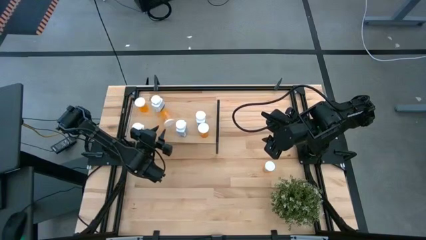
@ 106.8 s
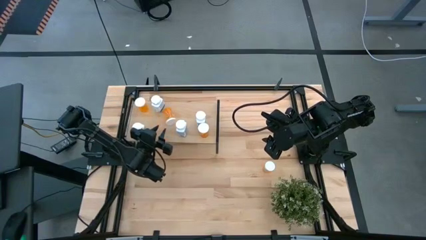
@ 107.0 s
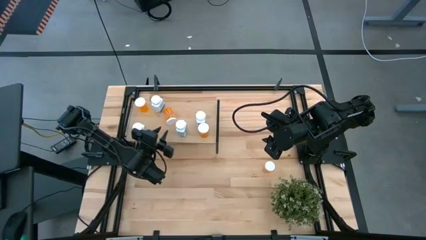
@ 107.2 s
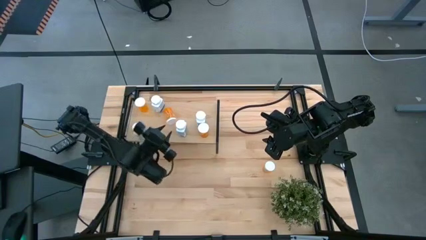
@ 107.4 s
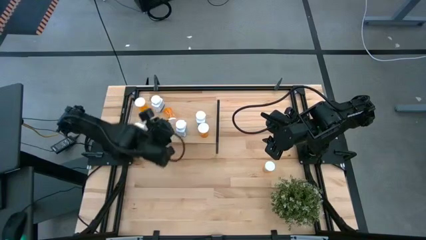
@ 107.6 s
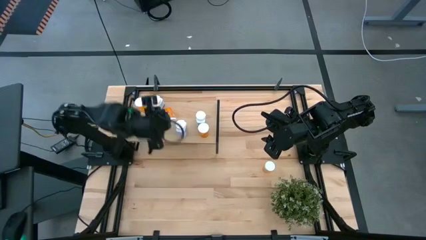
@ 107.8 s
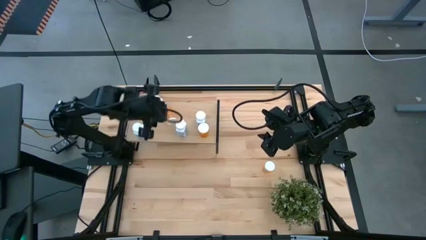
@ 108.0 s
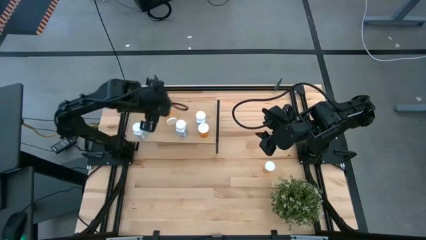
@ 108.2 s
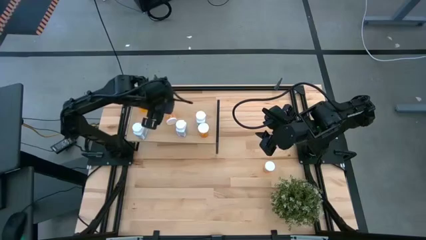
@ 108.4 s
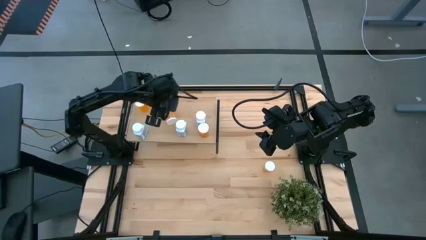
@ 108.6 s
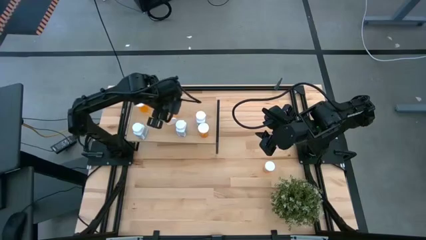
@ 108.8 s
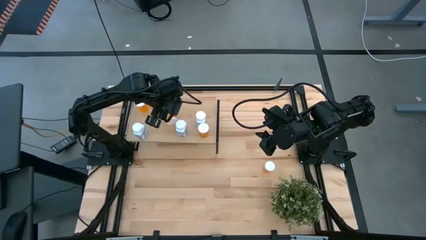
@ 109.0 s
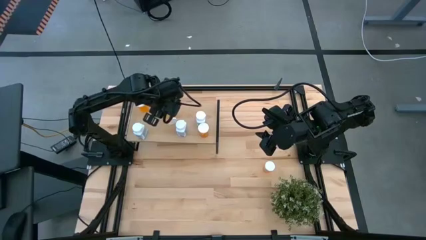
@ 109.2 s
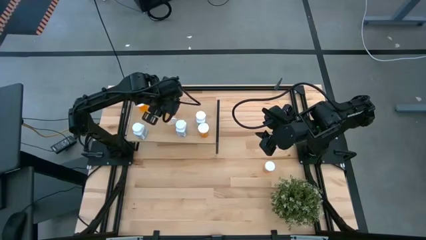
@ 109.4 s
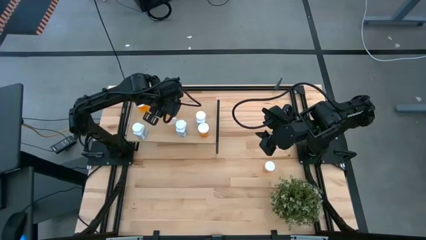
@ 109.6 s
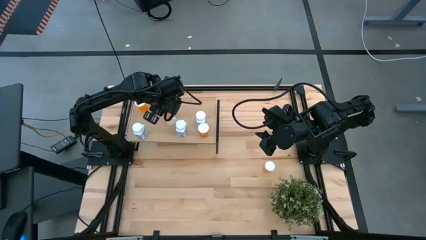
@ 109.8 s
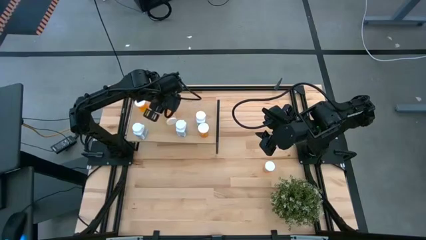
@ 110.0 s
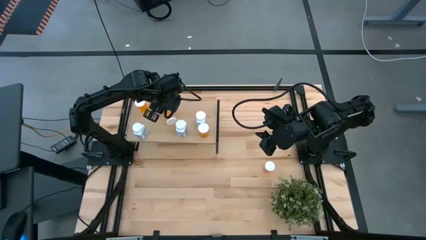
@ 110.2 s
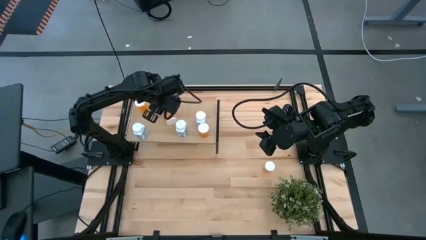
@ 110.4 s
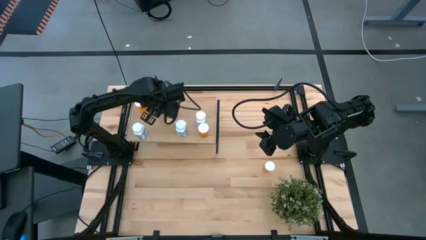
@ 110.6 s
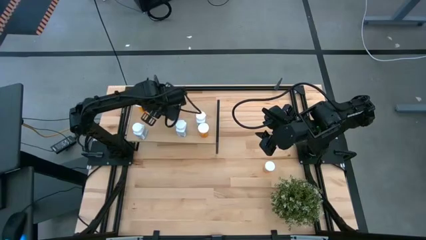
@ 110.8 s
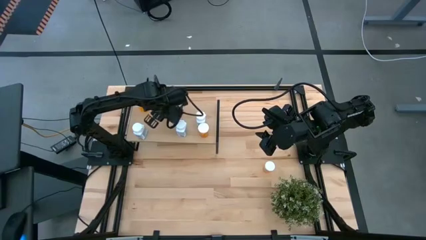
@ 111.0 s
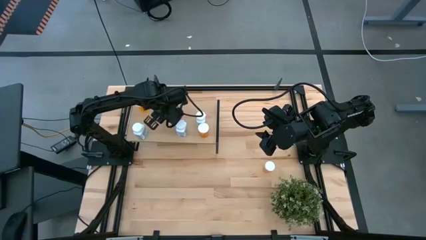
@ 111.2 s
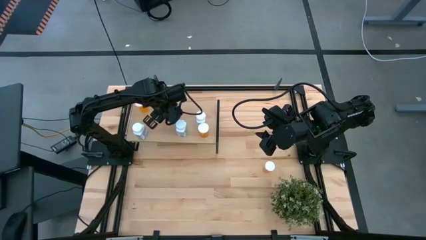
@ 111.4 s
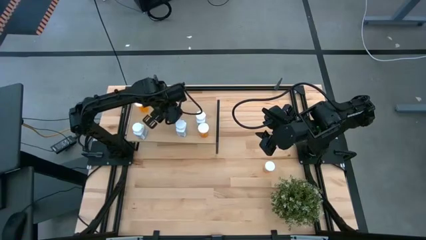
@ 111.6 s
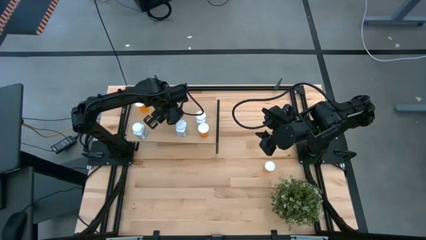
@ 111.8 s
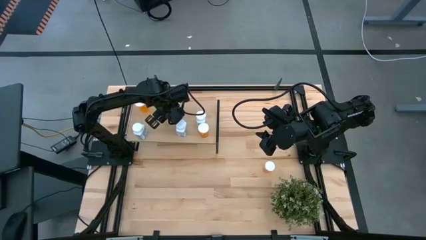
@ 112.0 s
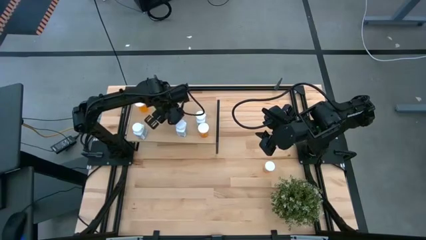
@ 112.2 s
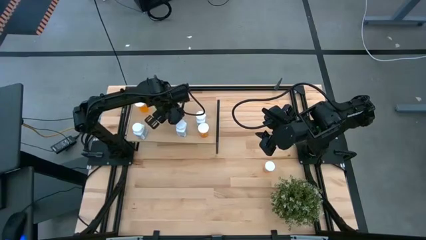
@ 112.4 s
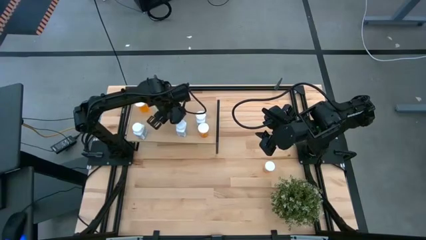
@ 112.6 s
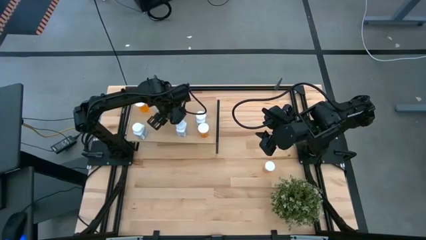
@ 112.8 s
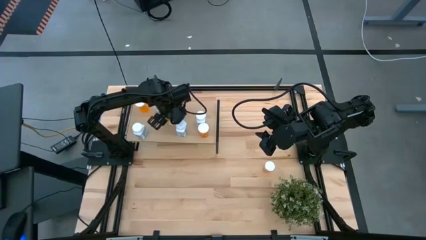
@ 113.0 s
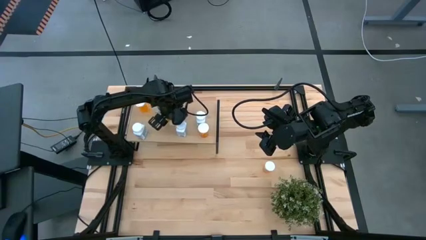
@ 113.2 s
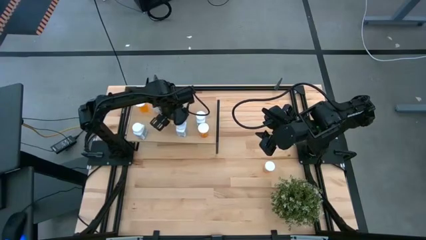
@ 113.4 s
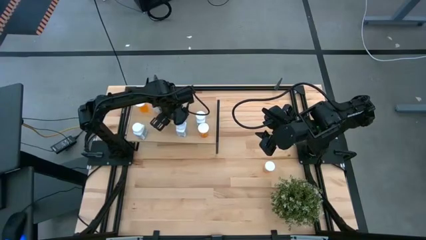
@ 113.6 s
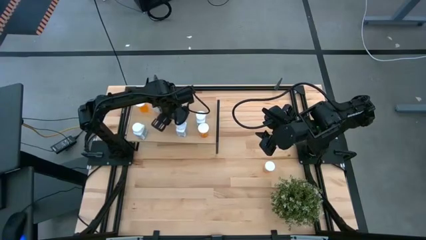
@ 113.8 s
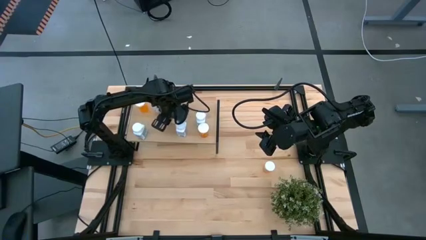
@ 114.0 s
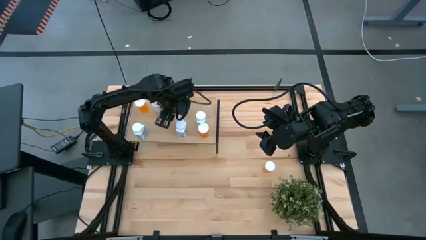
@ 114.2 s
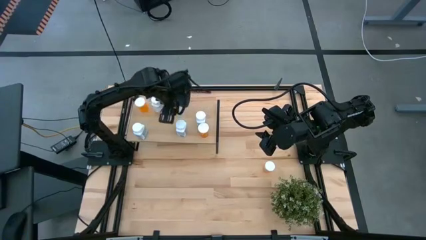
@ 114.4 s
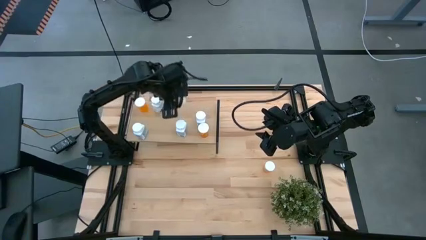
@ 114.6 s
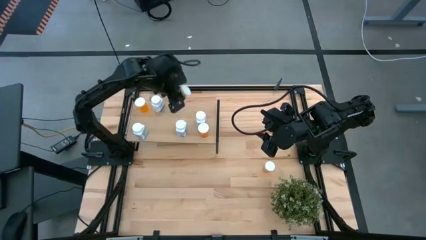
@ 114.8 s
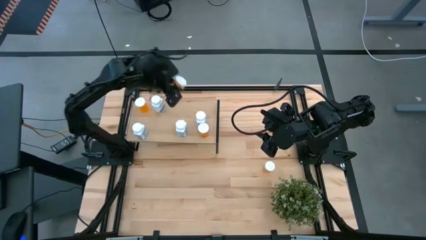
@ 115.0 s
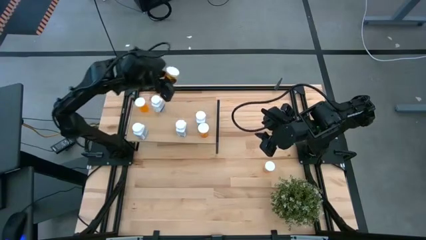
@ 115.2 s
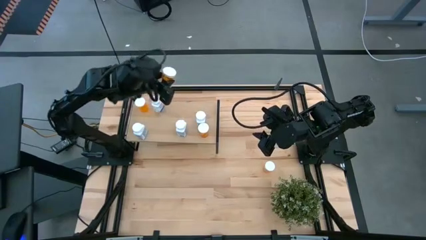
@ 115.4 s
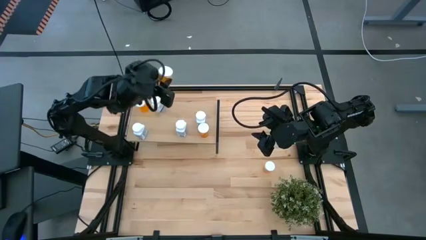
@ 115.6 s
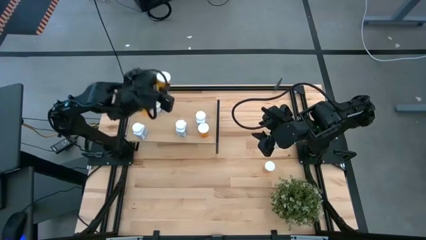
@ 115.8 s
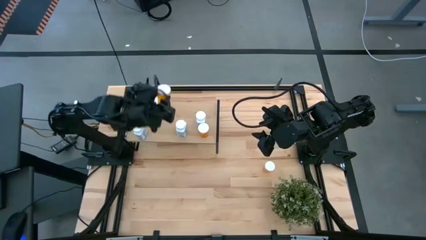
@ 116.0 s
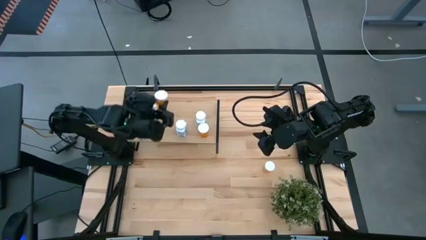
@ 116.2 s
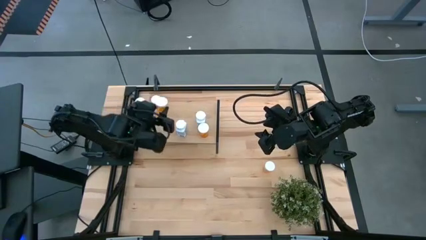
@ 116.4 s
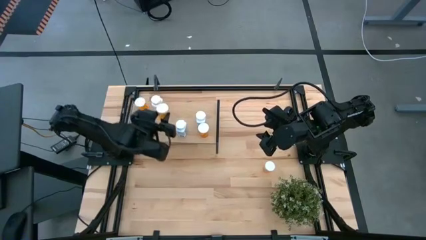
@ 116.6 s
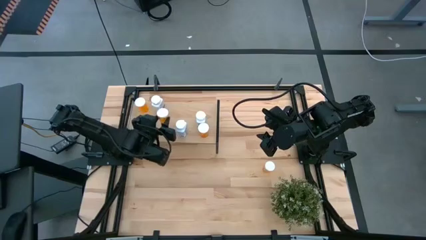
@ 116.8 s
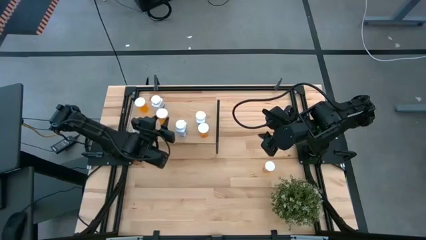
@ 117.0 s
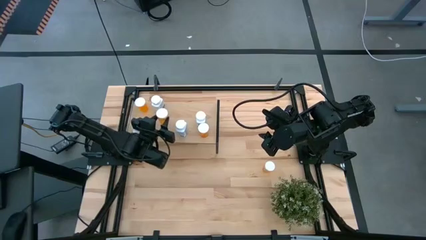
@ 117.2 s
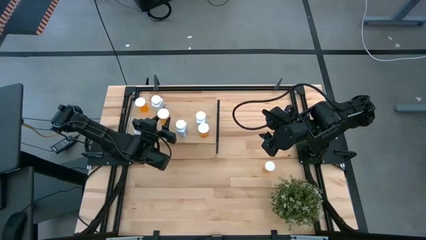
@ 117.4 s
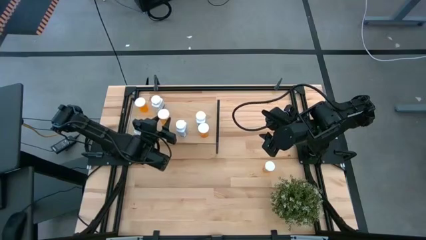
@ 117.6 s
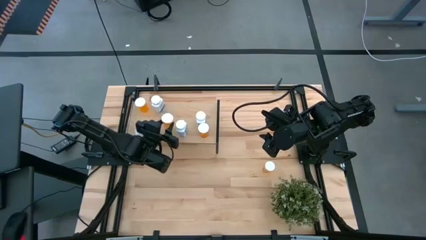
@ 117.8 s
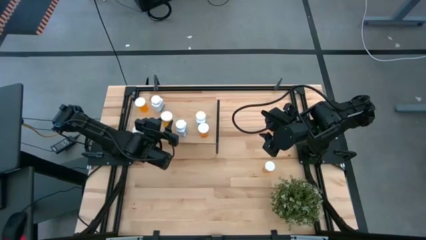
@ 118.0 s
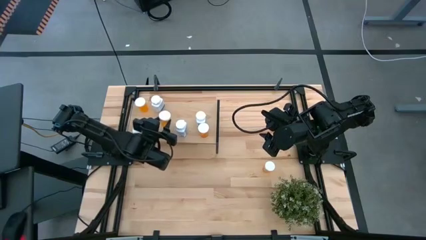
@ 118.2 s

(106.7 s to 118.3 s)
Task: Pick and place medicine bottles onto shelf by color
Put the orange pill bottle on the shelf

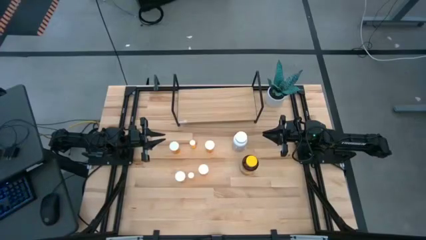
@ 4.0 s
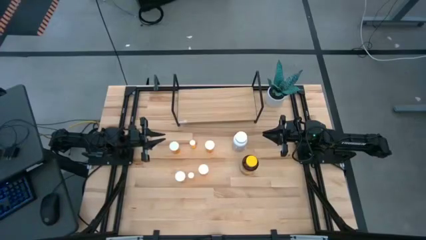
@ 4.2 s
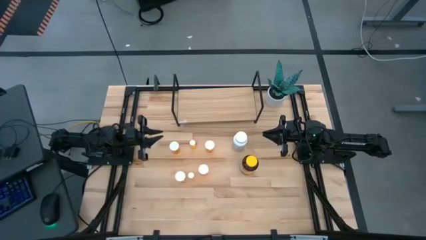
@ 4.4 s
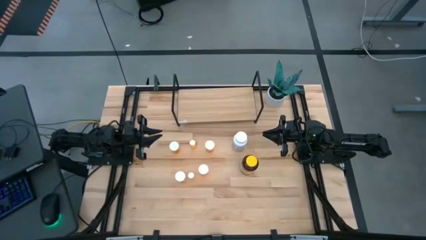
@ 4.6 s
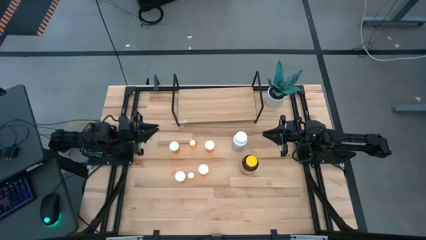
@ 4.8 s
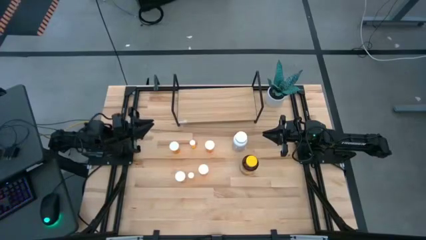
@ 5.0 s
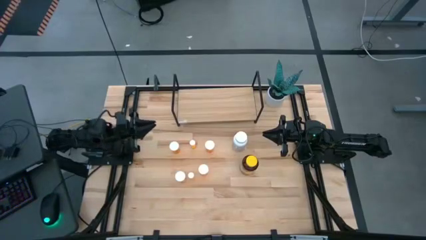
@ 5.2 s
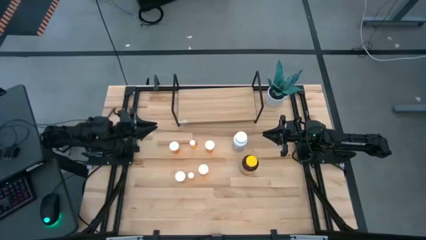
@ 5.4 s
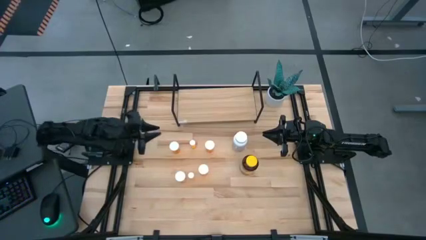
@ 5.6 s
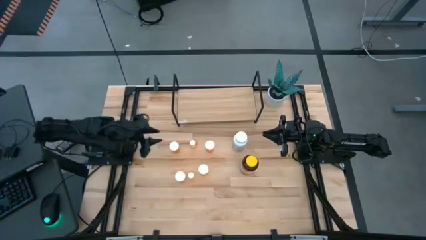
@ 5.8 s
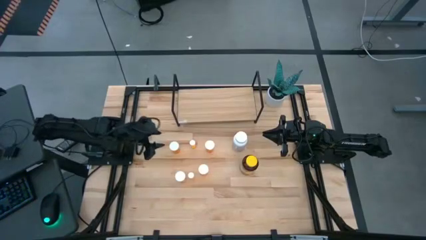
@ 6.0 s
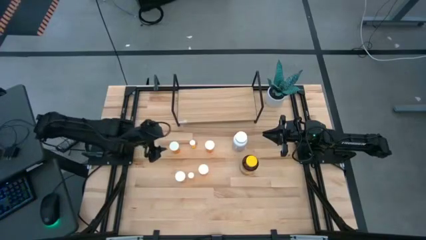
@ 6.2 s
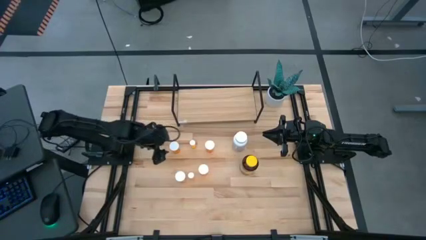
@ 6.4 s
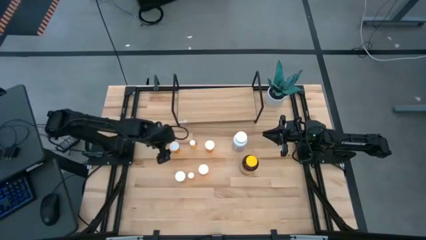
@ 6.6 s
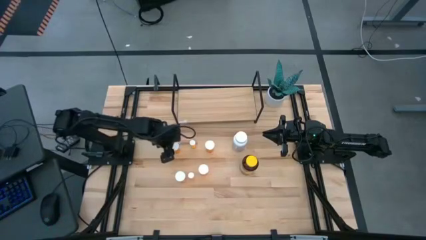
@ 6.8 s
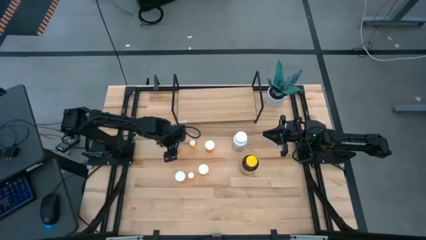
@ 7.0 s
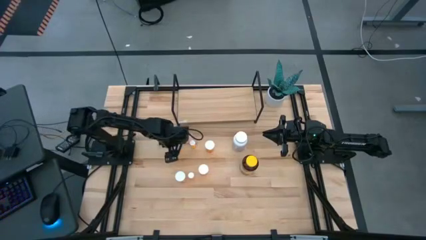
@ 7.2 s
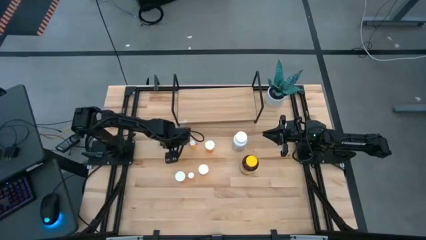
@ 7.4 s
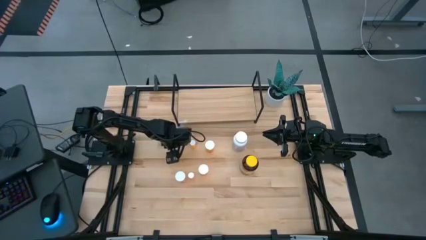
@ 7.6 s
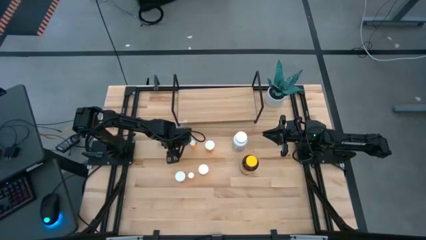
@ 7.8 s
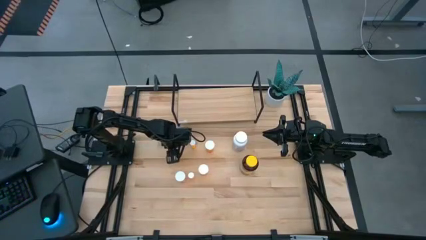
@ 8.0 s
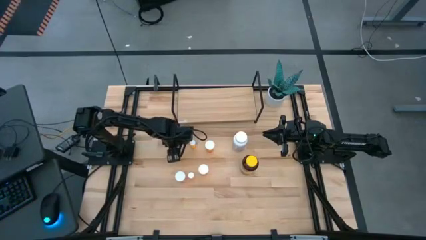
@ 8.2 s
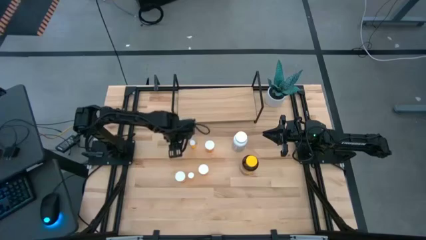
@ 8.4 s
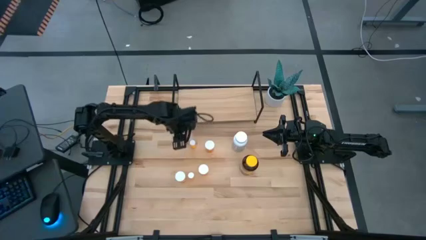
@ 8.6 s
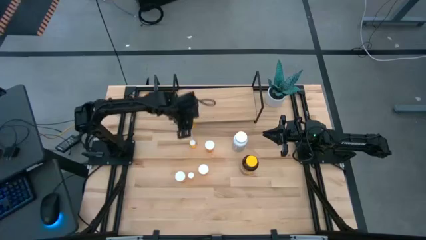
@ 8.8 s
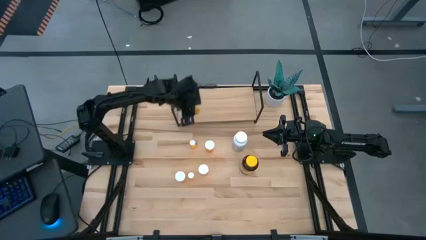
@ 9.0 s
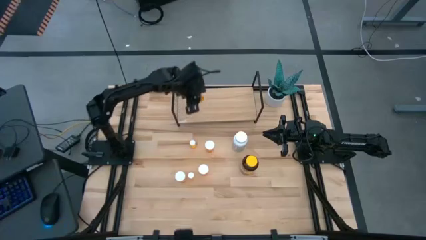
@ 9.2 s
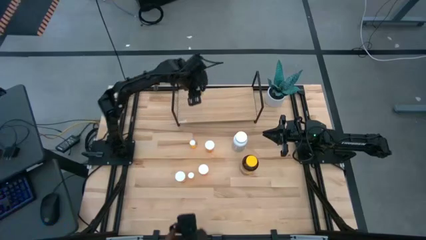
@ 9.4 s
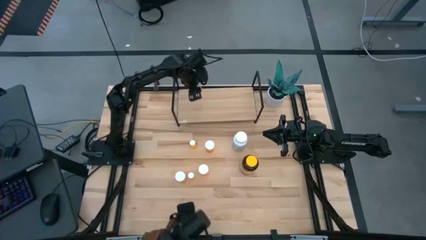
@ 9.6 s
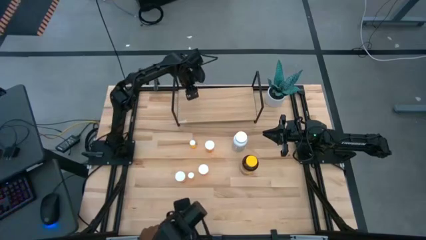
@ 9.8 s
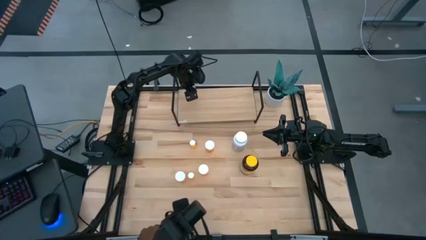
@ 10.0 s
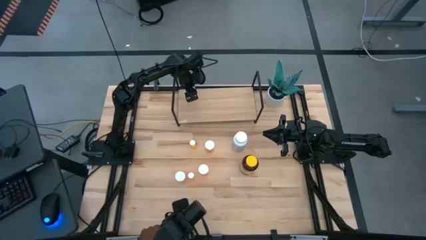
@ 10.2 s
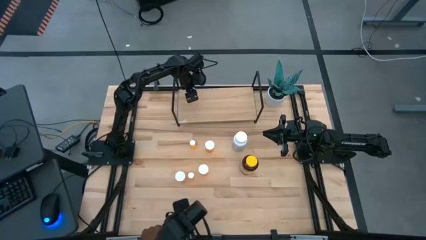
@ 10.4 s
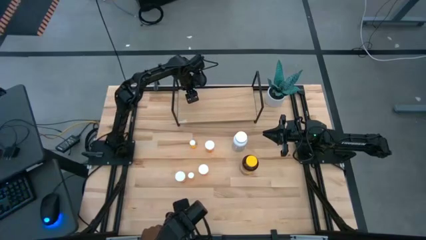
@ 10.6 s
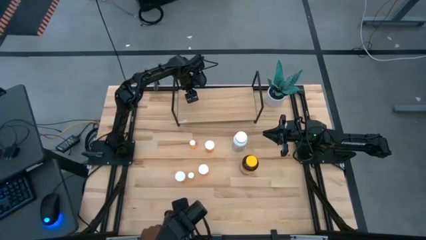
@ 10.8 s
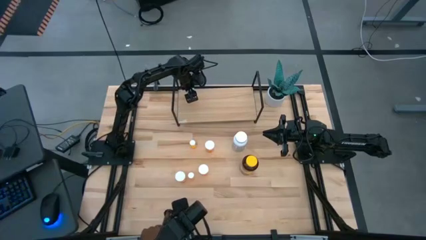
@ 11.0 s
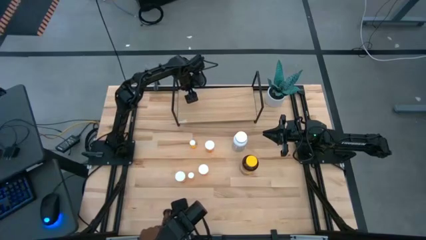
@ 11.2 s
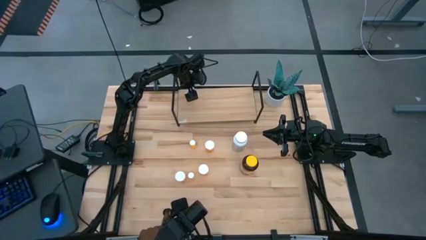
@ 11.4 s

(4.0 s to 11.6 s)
Task: Pick and place medicine bottles onto shelf by color
Put the top left big orange pill bottle on the shelf
